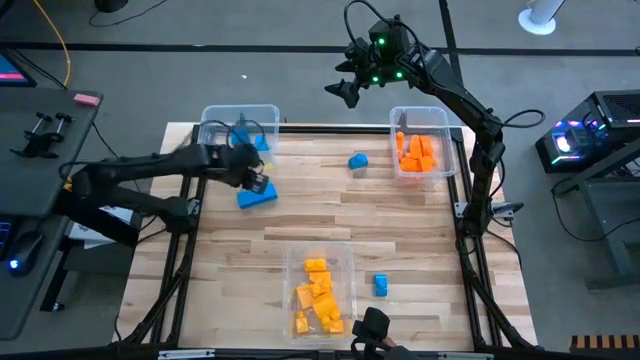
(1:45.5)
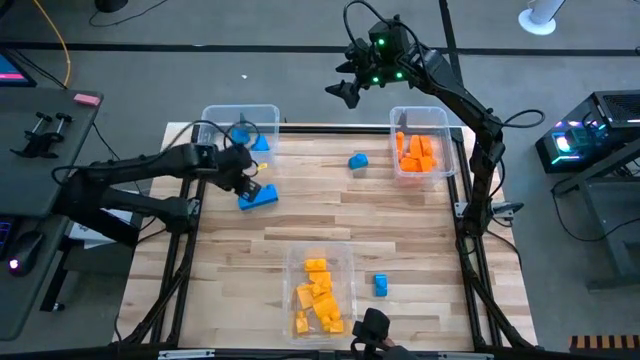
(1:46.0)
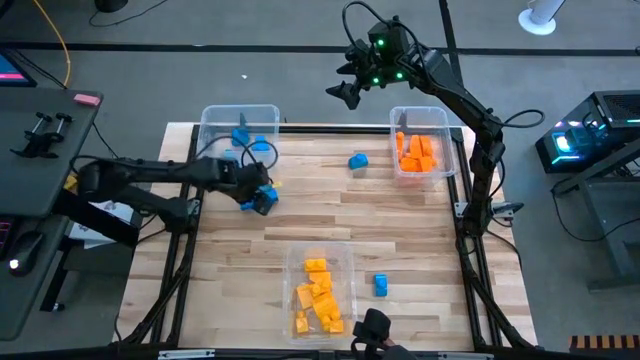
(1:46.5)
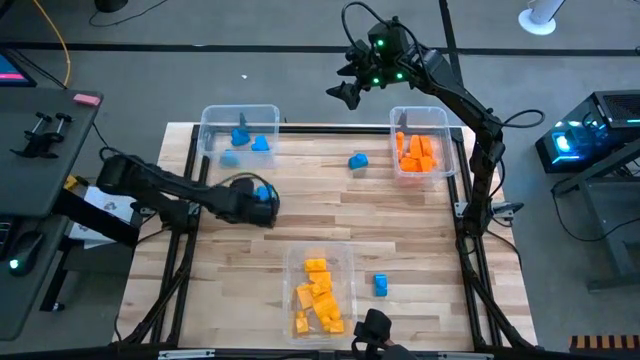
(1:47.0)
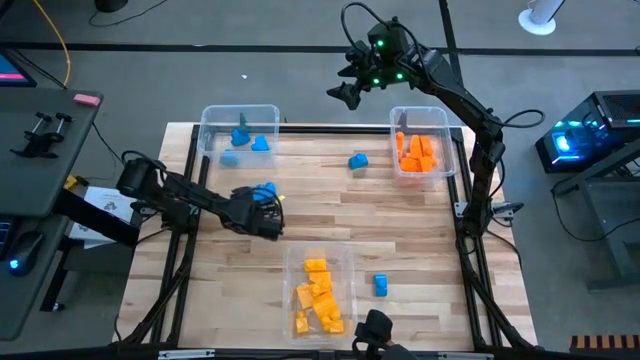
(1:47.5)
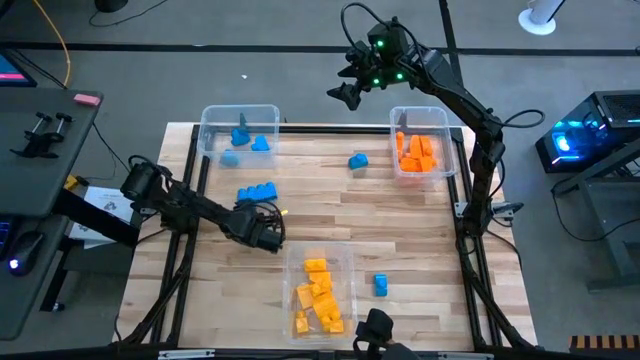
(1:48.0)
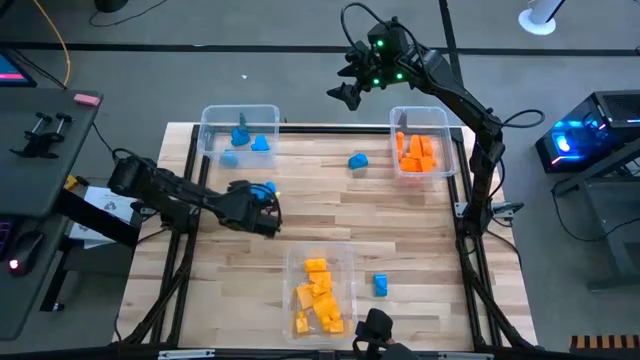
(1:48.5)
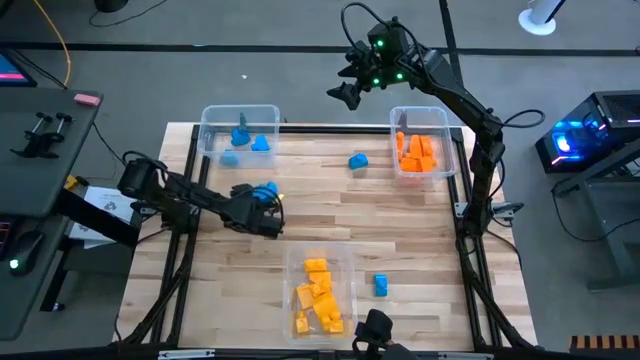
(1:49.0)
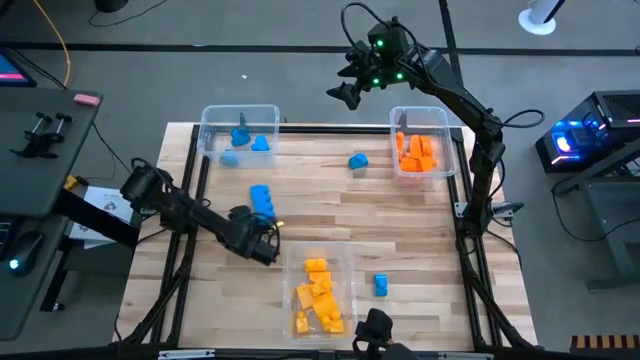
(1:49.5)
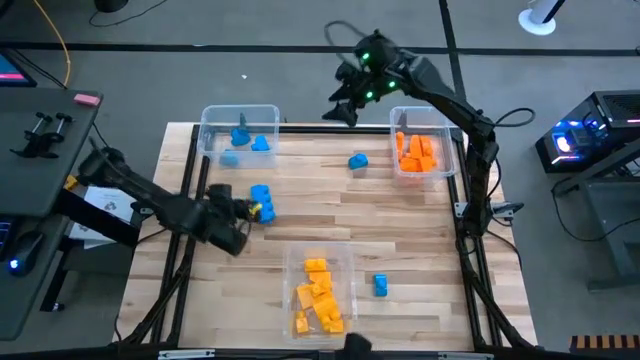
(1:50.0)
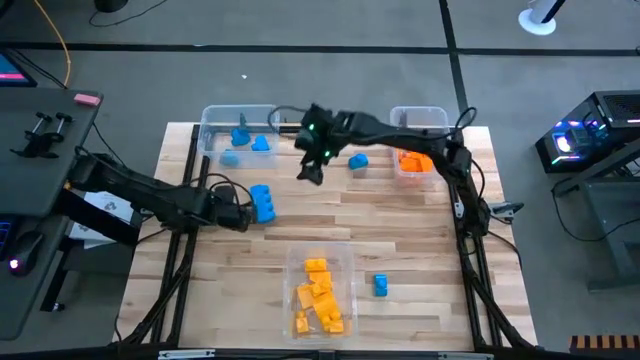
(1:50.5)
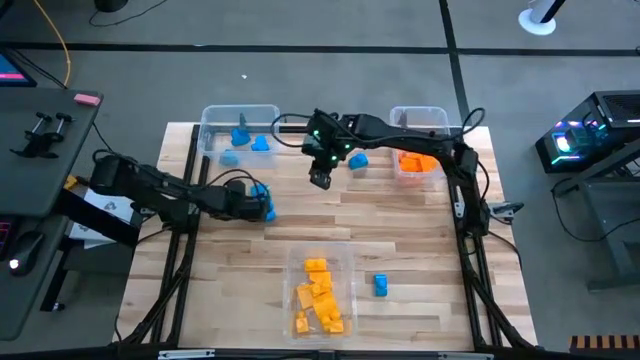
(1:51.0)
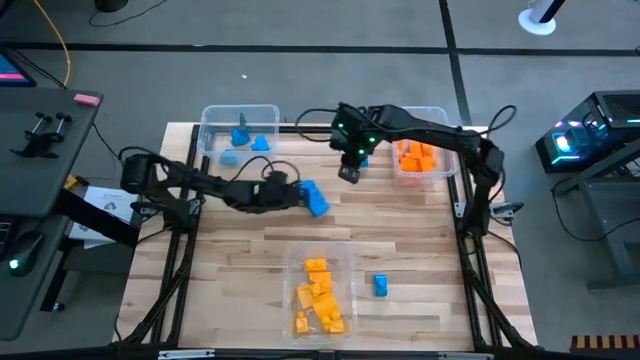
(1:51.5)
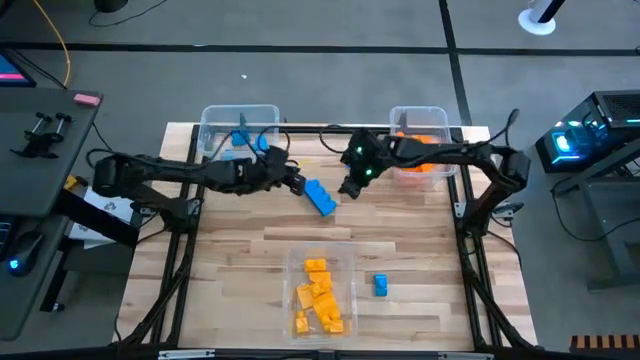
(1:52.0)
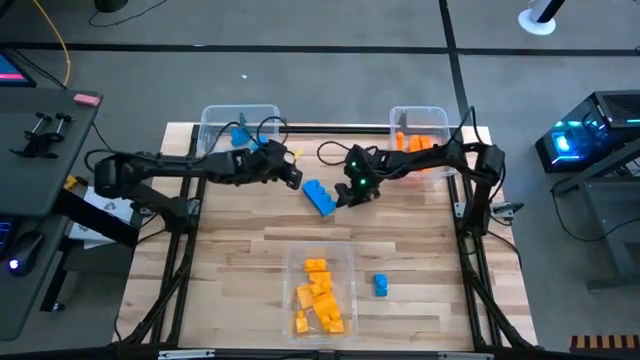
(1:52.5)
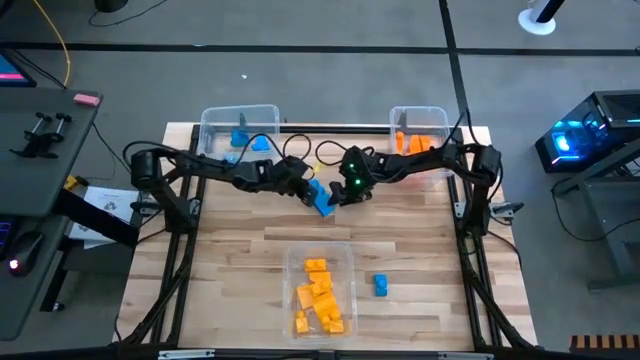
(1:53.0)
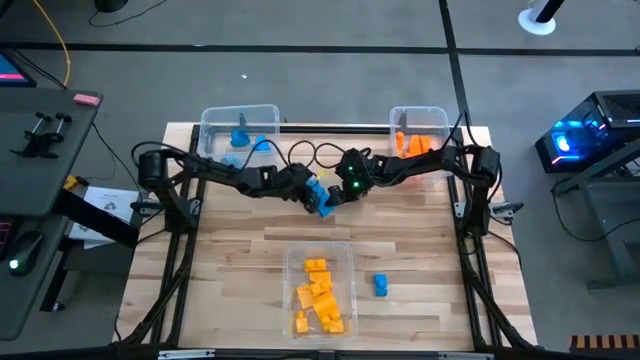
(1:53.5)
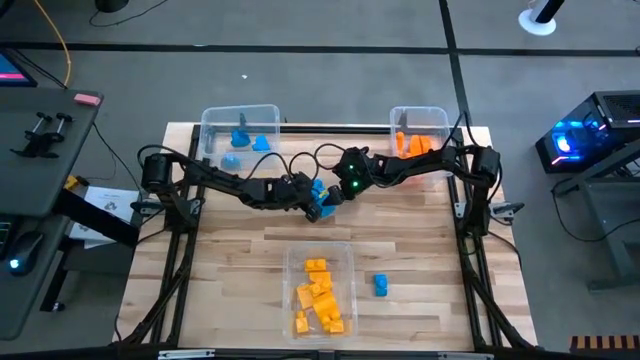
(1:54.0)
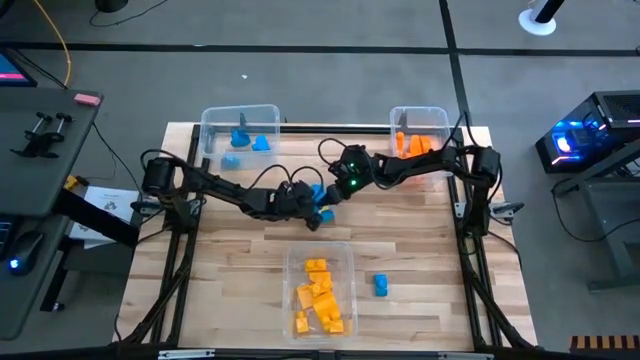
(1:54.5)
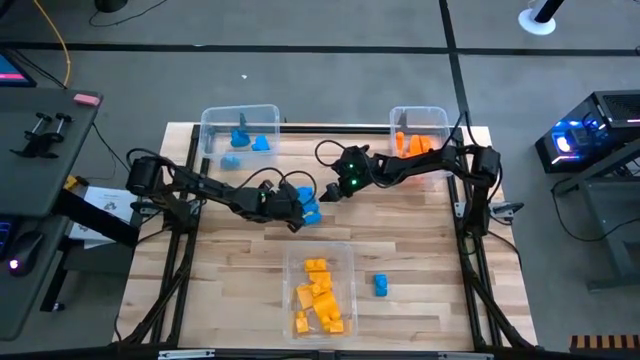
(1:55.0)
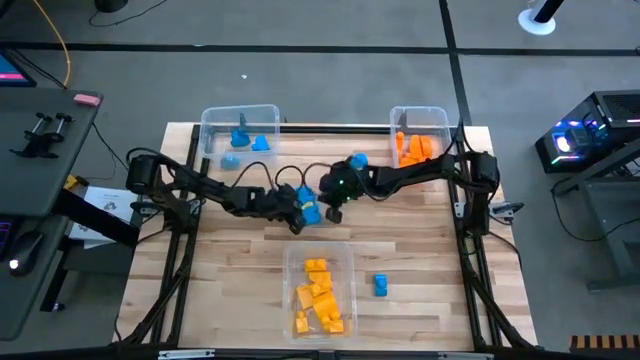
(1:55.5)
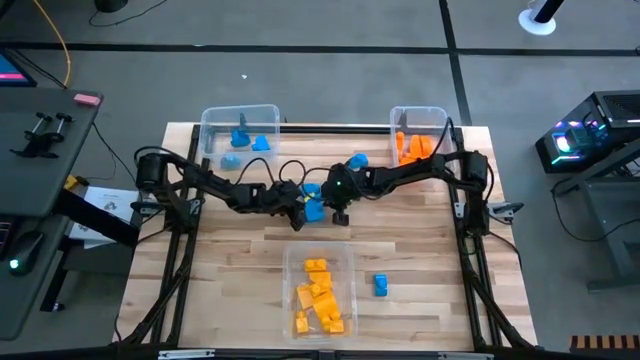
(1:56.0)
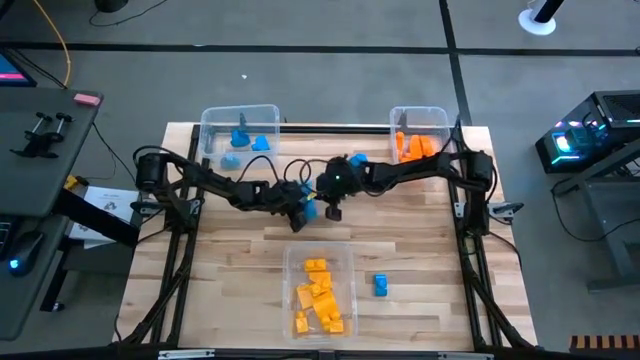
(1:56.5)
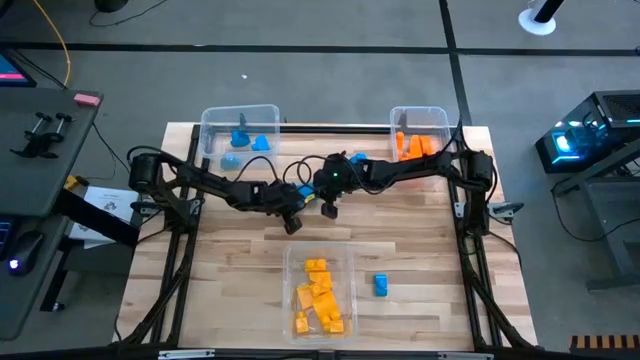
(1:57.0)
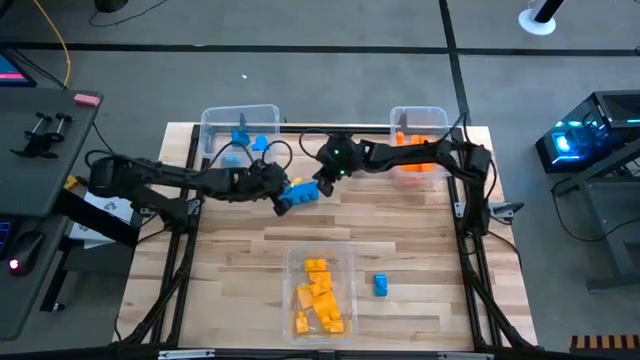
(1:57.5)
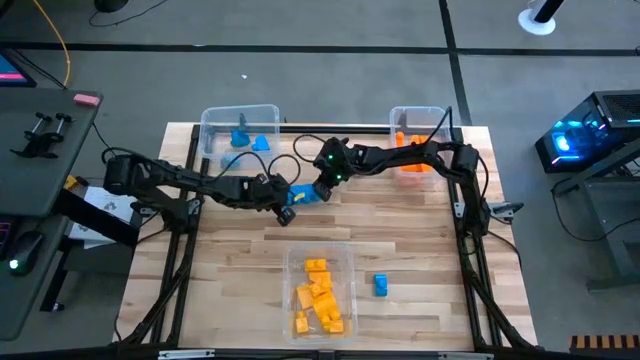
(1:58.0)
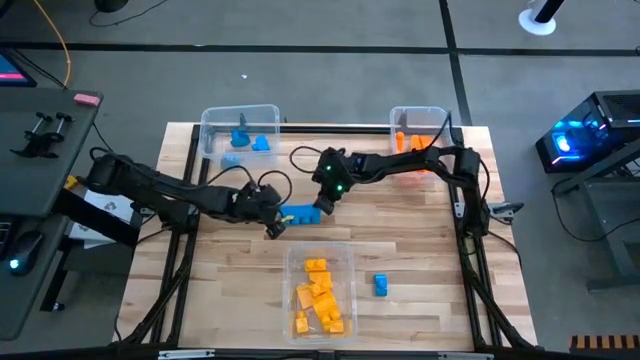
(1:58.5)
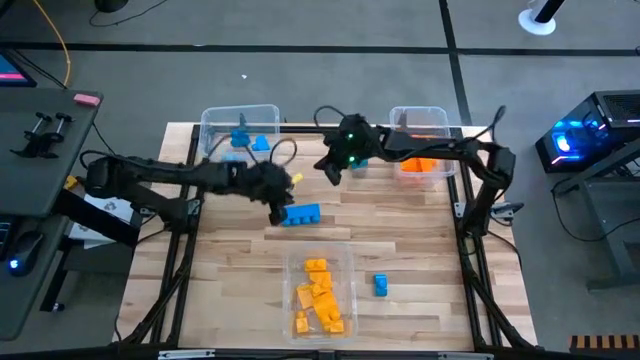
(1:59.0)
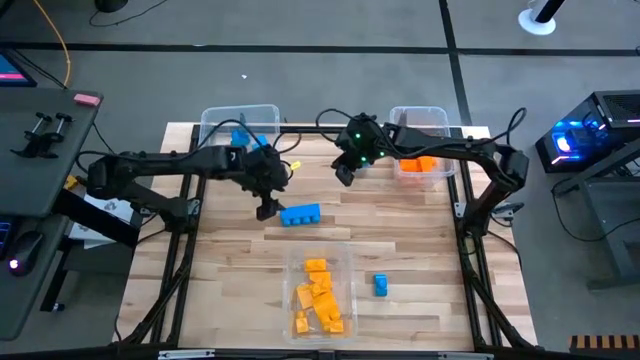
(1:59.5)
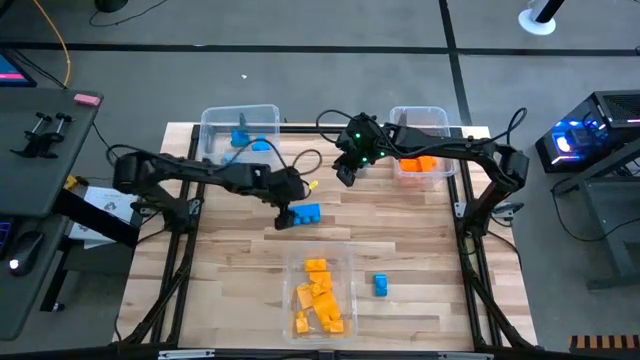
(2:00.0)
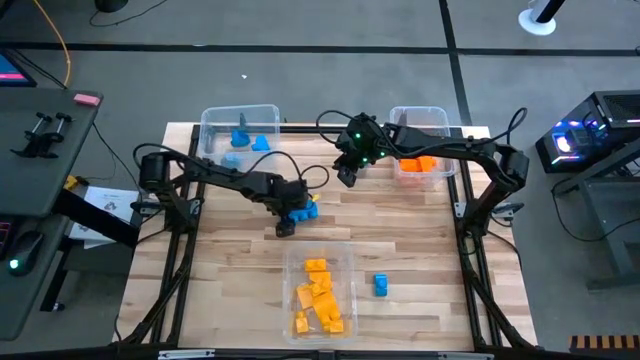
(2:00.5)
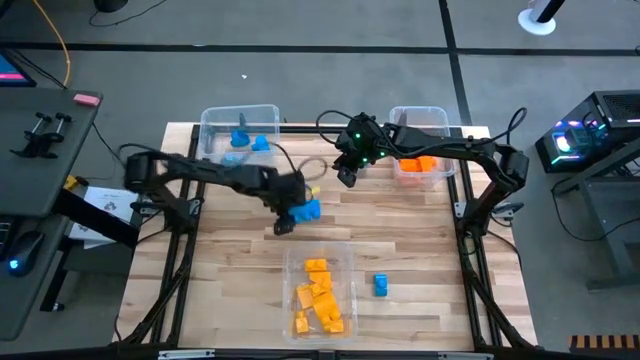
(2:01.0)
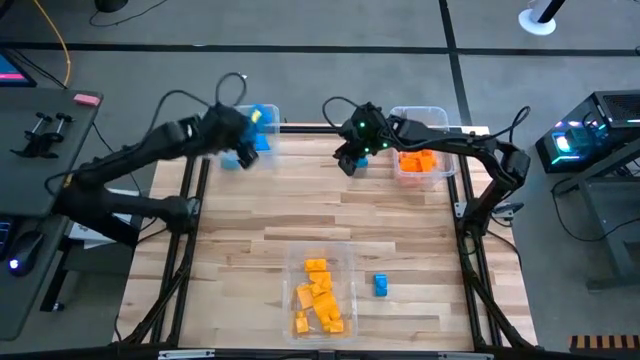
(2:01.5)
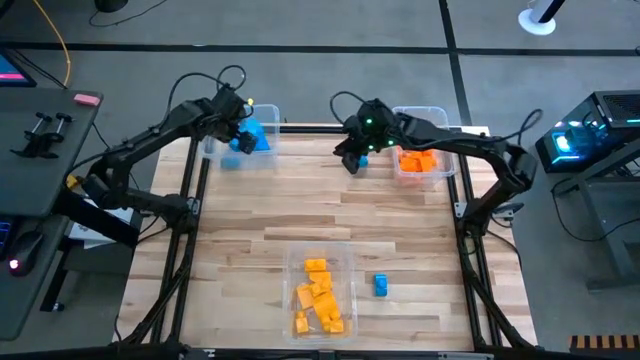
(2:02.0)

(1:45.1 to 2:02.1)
Task: Sort blocks
Put the blue game piece into the top left transparent bin

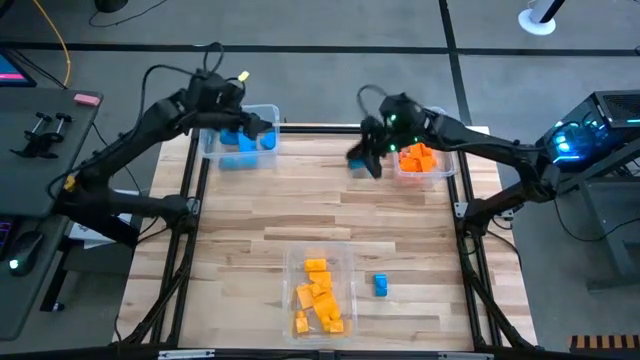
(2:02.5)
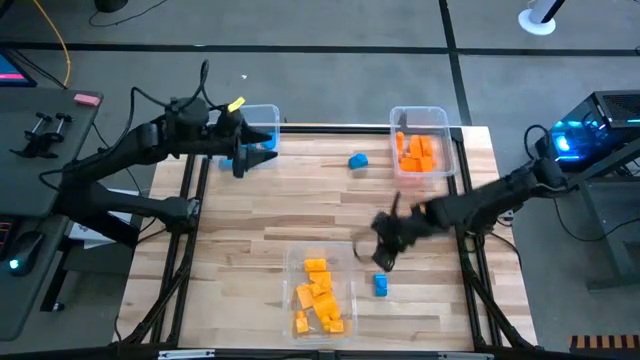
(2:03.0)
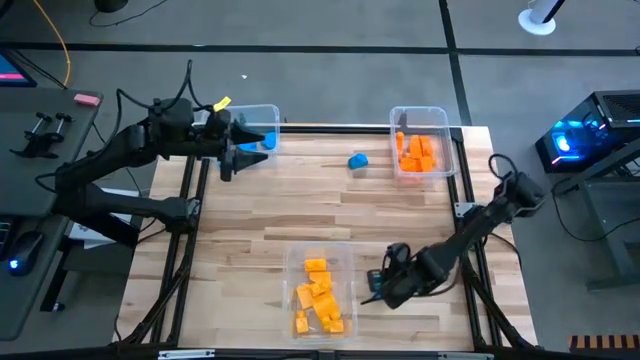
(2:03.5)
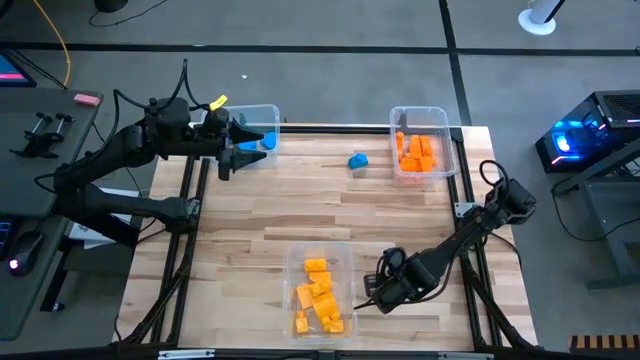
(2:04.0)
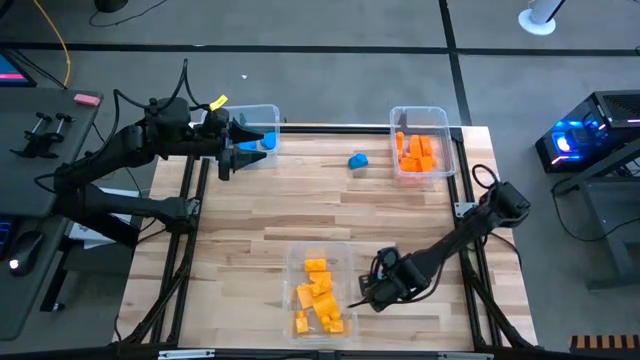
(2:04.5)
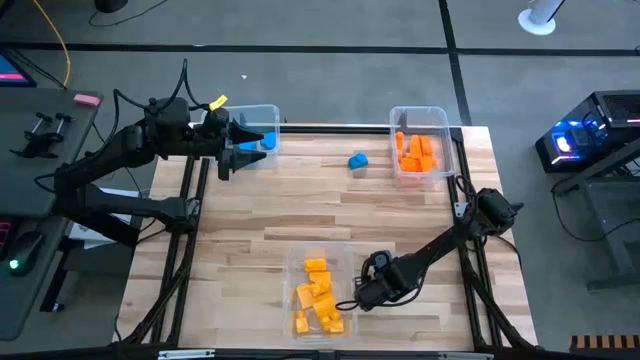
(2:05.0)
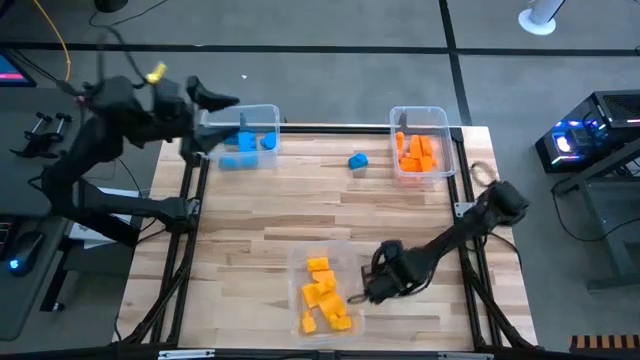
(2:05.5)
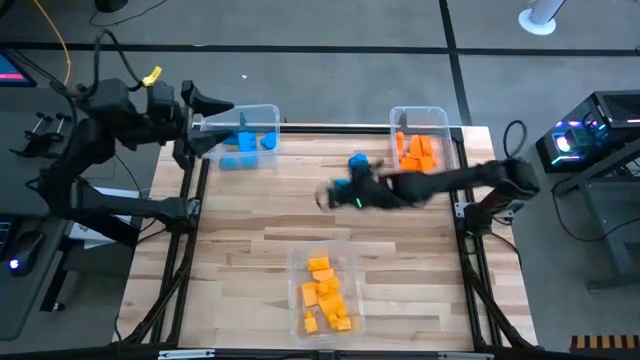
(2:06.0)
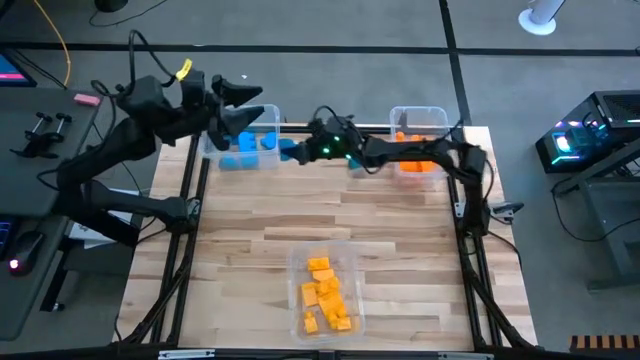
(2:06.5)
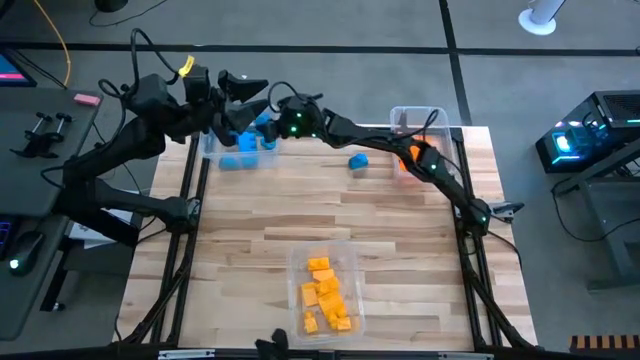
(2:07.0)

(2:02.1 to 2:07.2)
Put the blue game piece into the top left transparent bin
